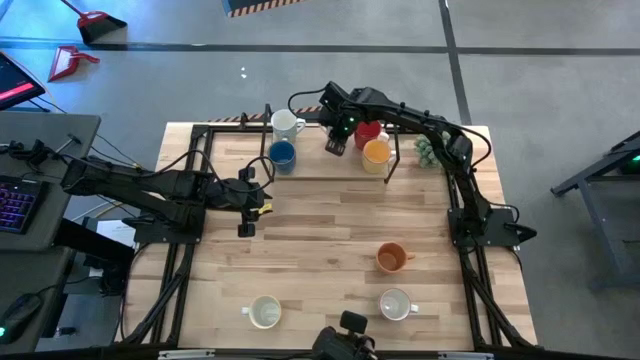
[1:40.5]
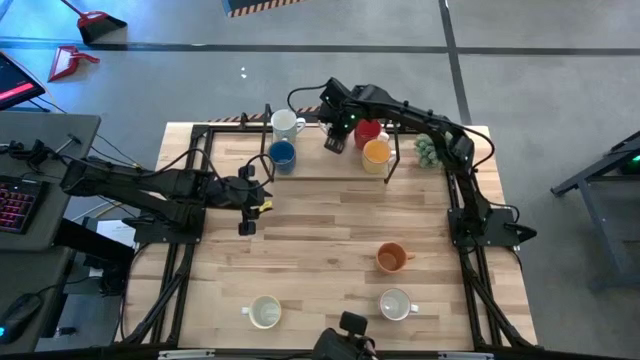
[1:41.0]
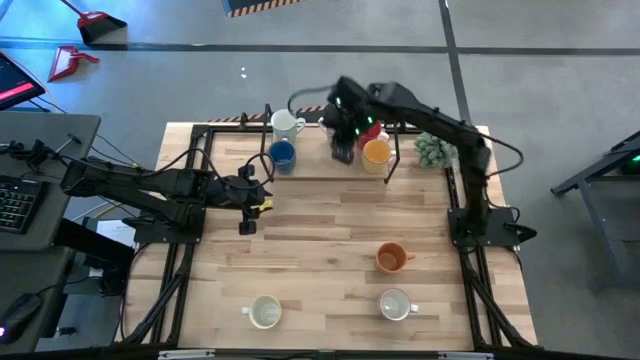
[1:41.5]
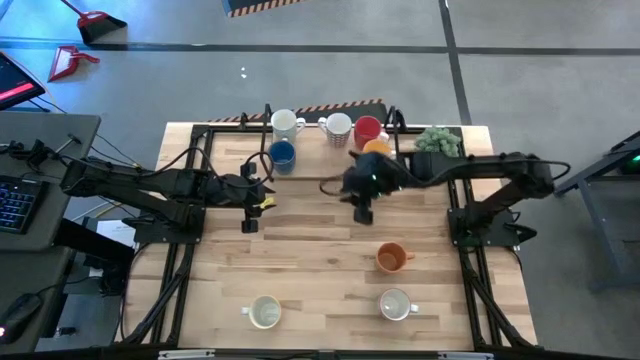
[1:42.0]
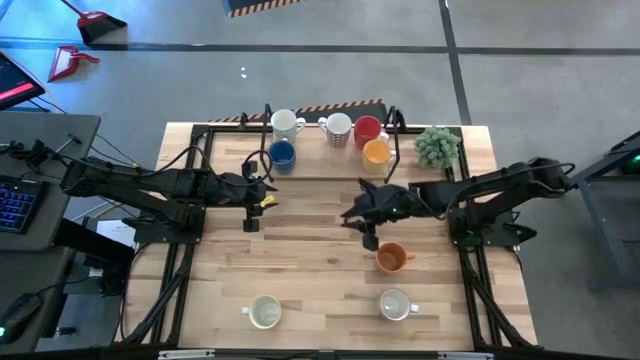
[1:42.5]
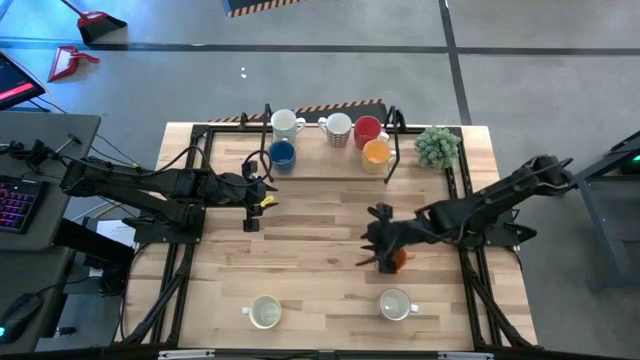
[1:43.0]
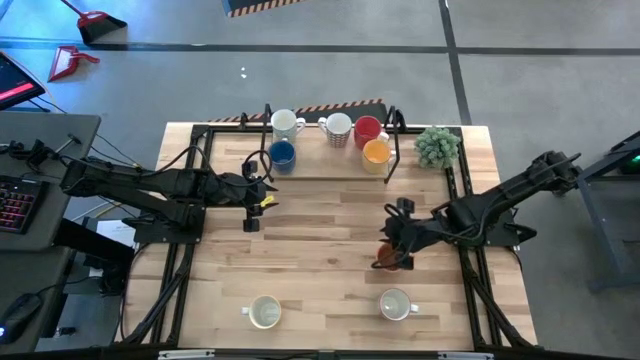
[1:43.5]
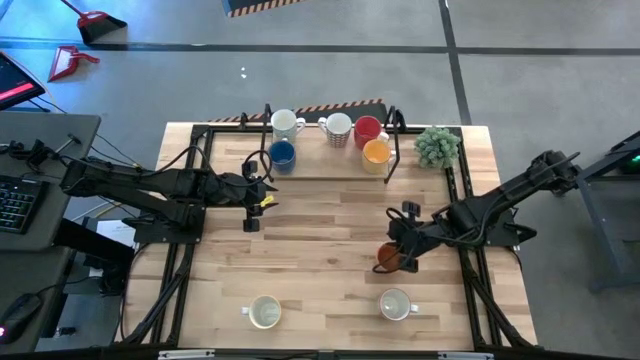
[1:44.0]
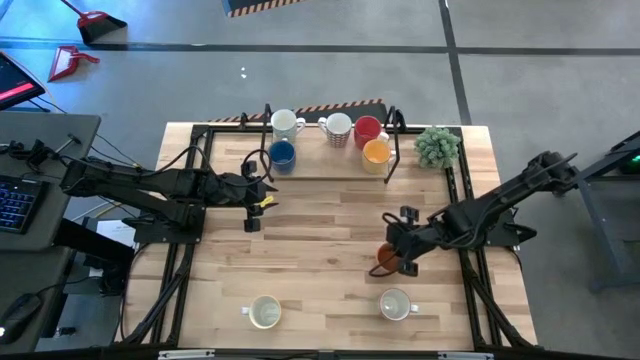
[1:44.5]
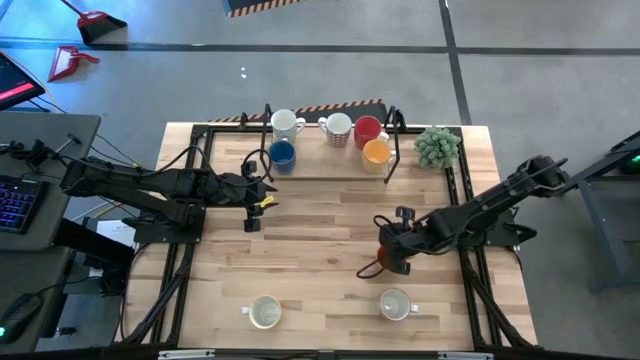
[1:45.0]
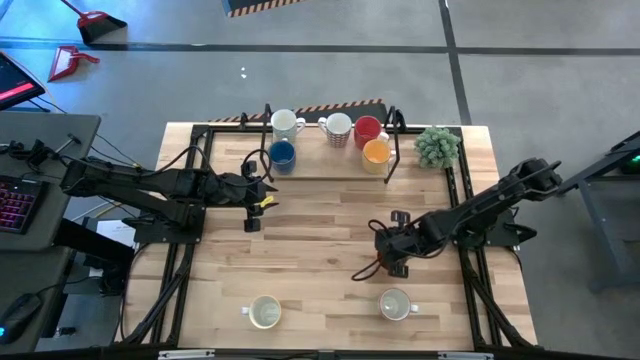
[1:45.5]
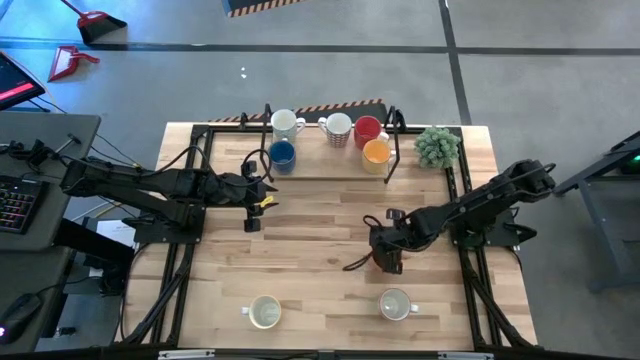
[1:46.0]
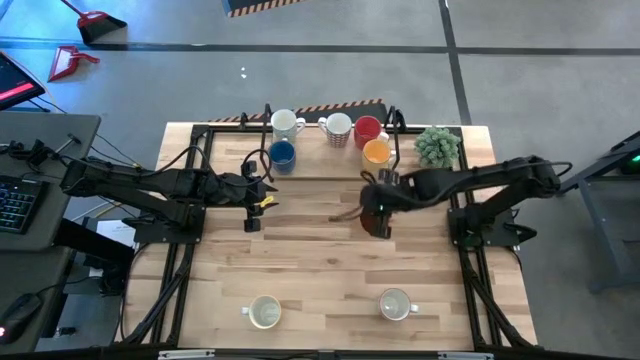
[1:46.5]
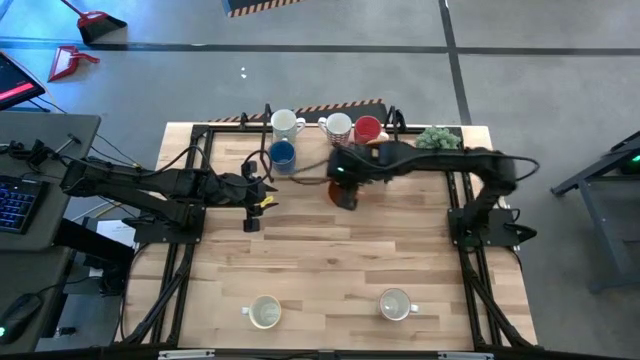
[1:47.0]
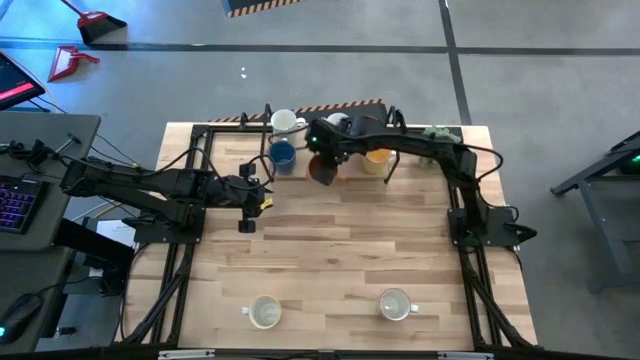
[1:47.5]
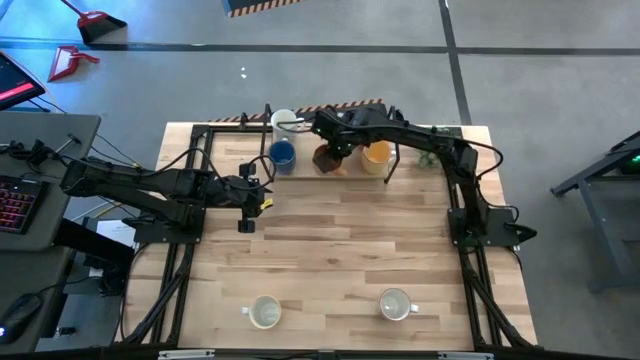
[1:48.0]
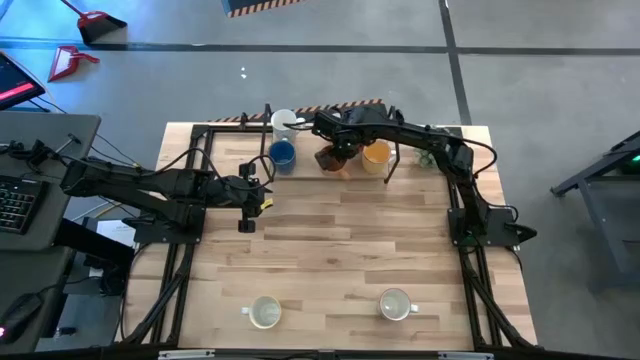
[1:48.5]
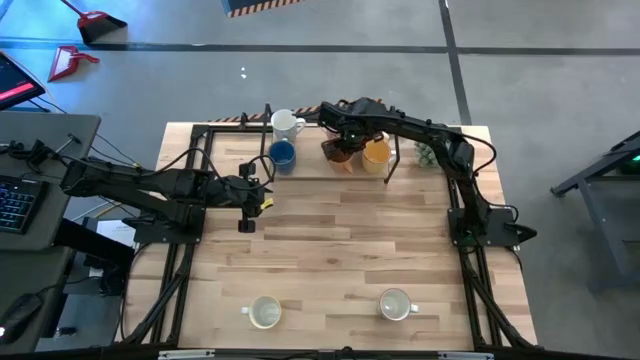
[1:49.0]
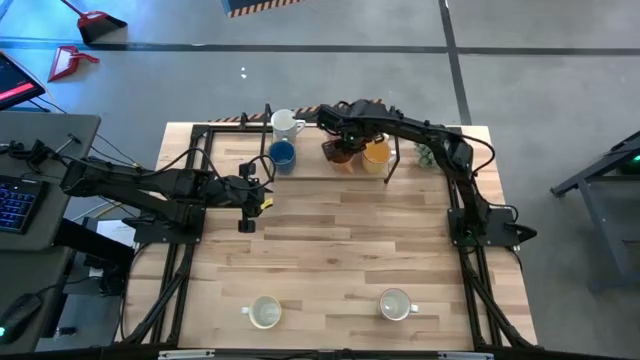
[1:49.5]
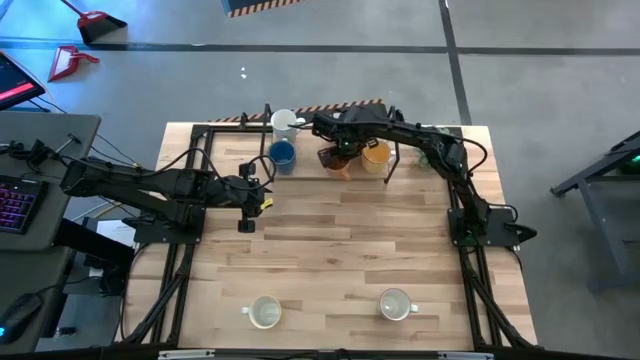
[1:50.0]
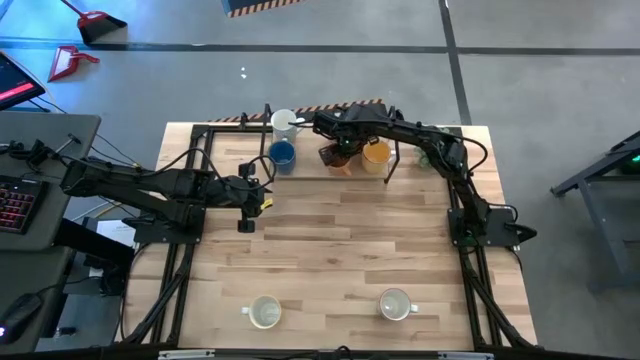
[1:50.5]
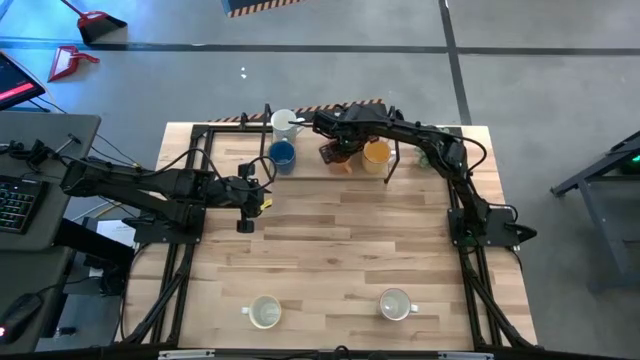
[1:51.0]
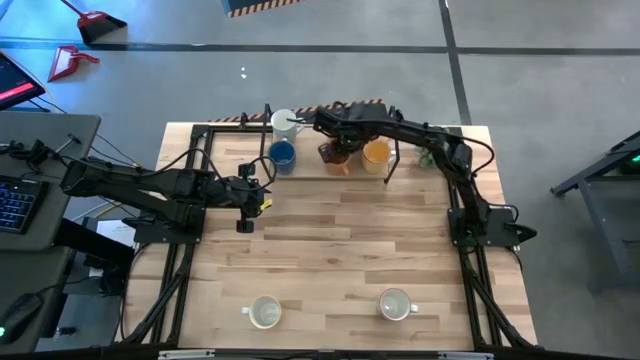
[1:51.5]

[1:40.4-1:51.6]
Task: Place coffee mugs
Put the orange mug on the shelf

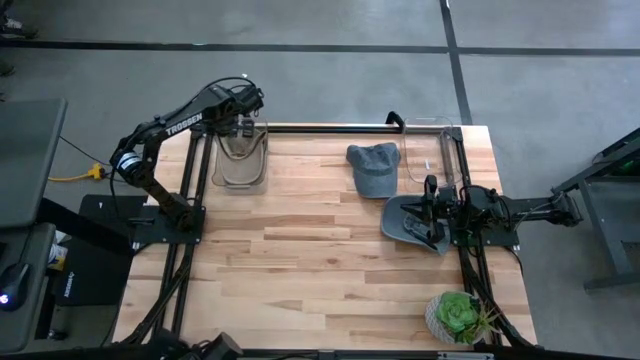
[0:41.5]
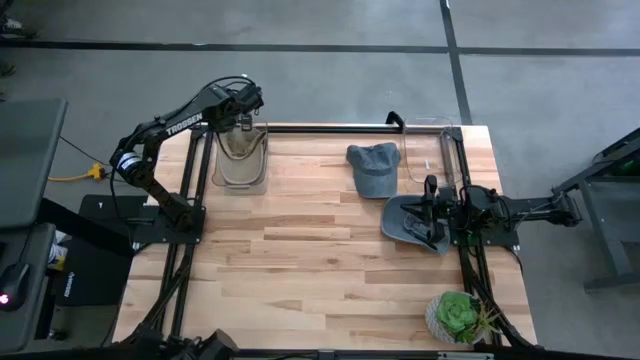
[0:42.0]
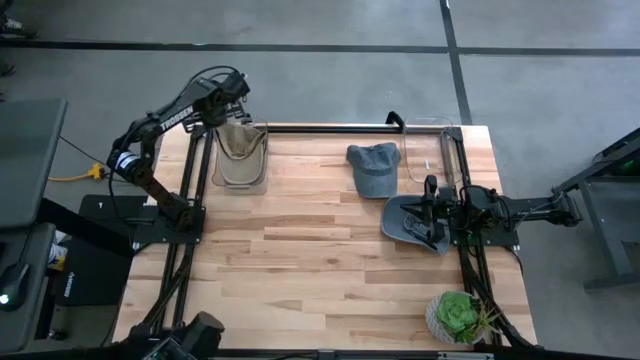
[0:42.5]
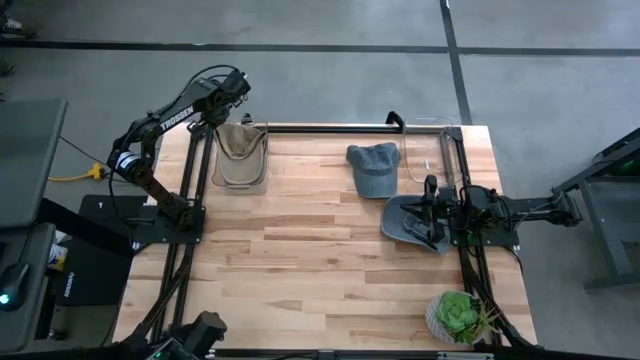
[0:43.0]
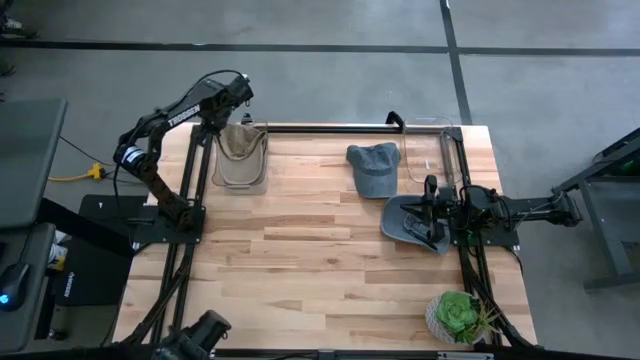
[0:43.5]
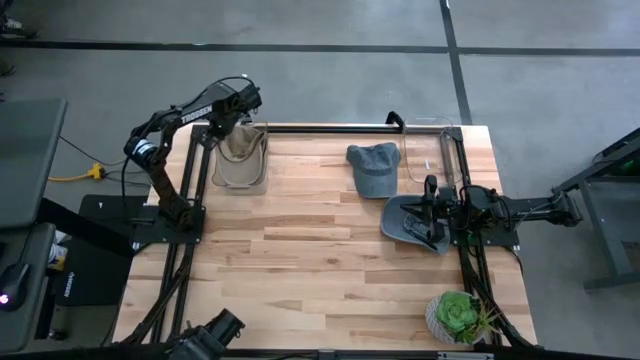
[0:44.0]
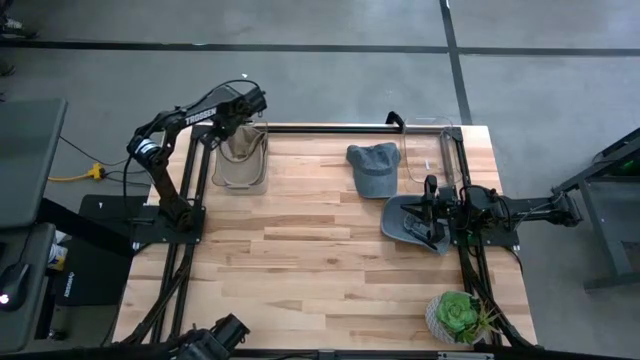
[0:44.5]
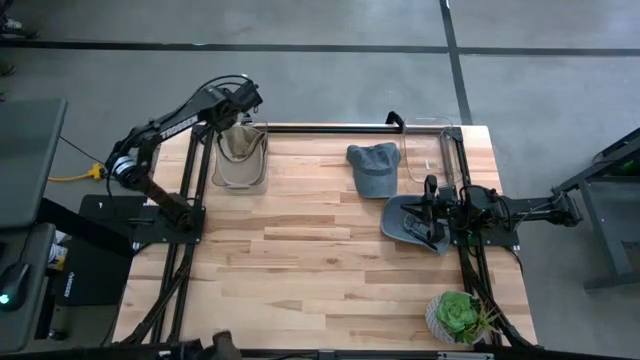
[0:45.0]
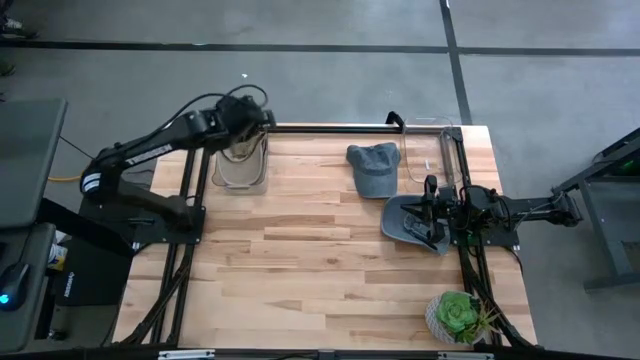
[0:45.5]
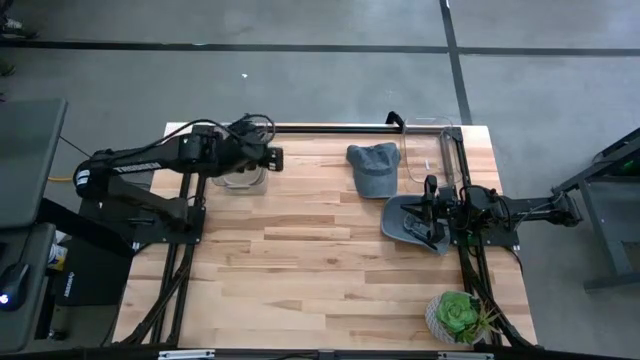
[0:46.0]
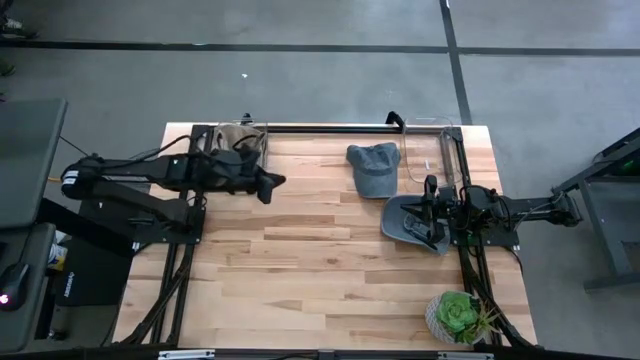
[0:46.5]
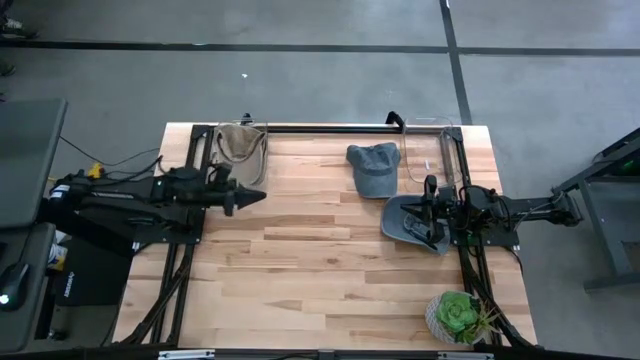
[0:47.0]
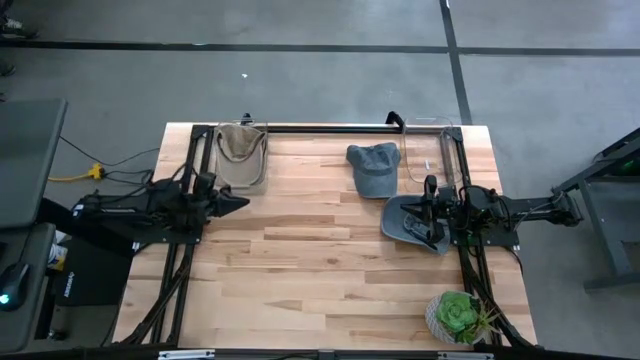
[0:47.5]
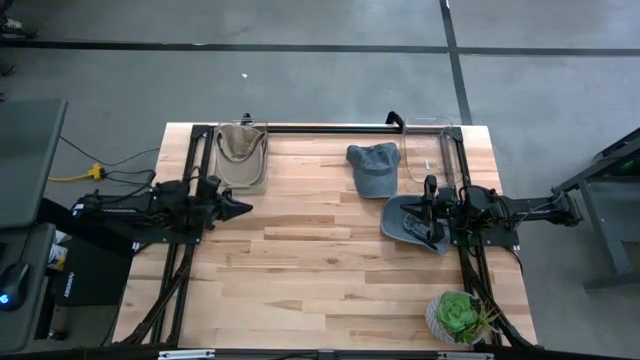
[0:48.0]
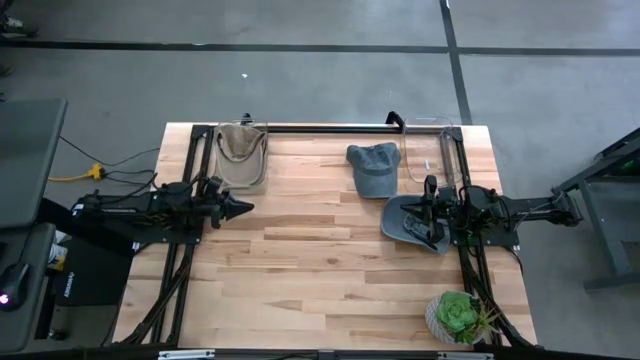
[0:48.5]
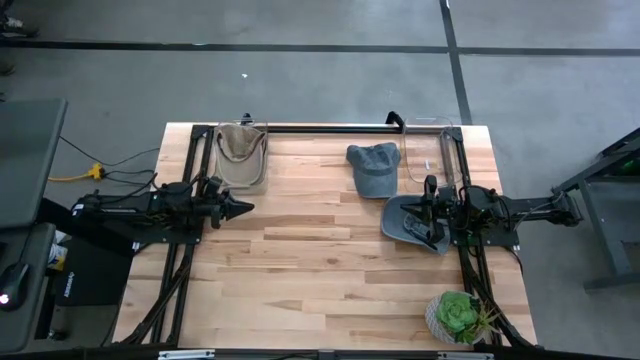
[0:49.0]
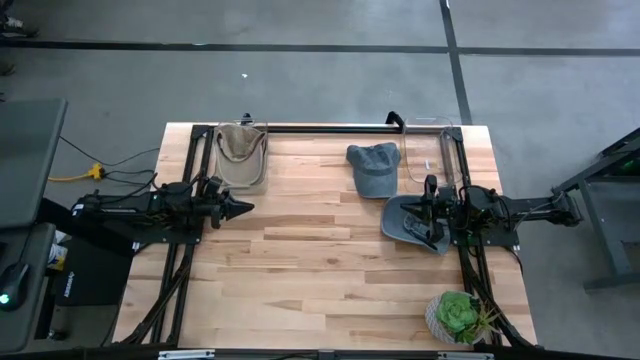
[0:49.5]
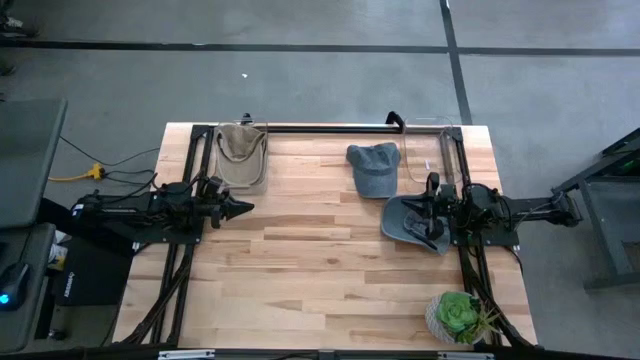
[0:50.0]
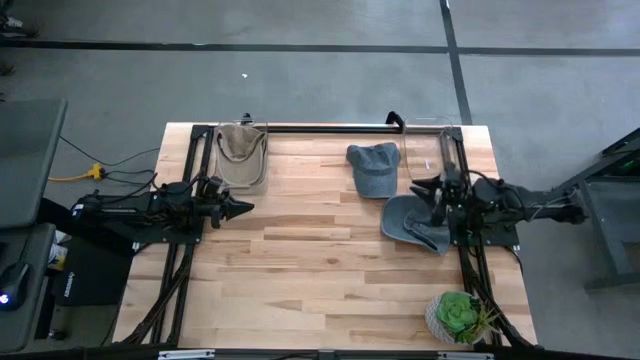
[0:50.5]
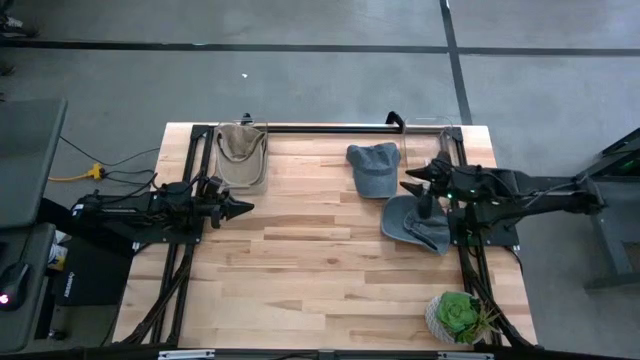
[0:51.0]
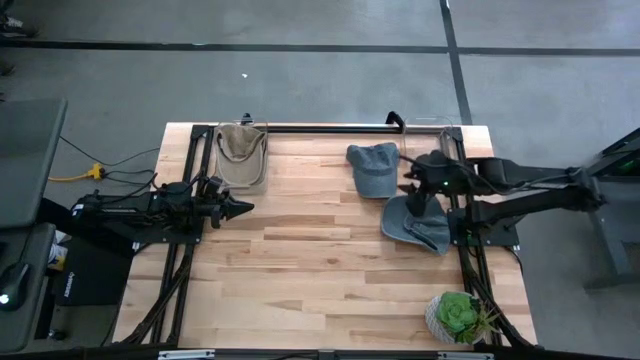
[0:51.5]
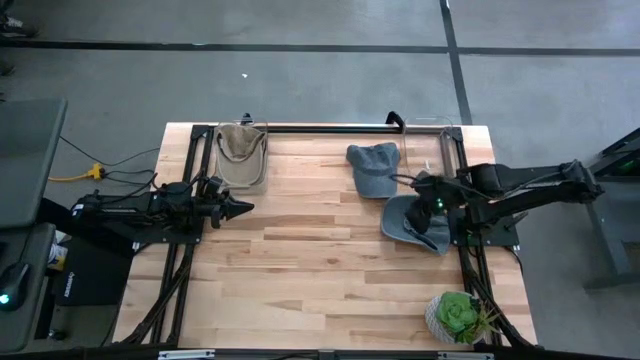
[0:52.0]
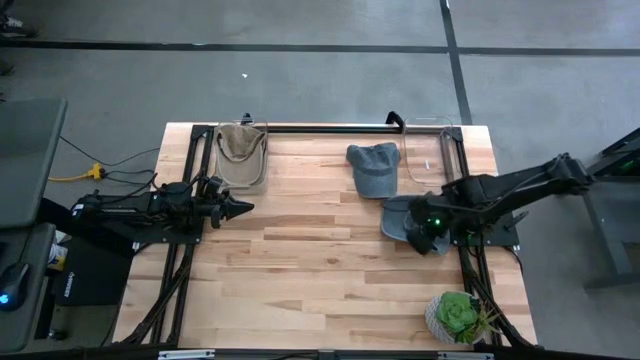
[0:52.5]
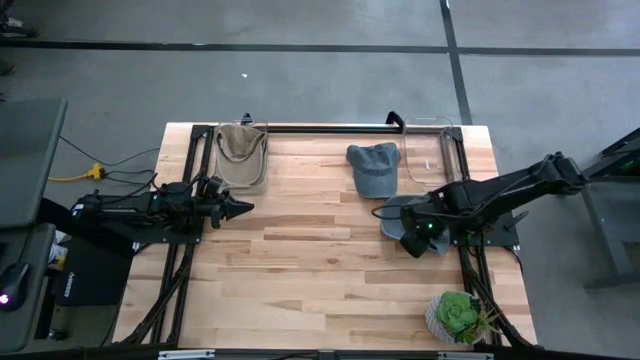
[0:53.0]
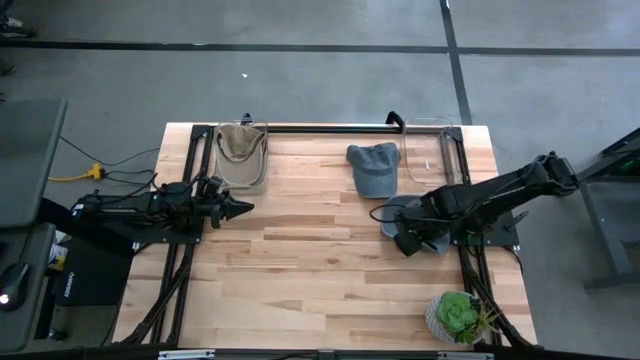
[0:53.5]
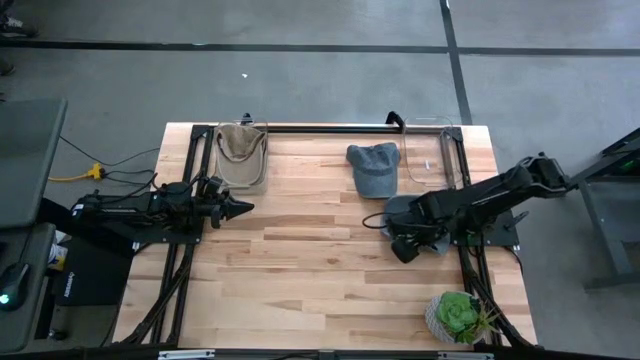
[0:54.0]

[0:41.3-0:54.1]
Task: Pick & Place hat
Put the bottom blue cap into the right transparent bin
